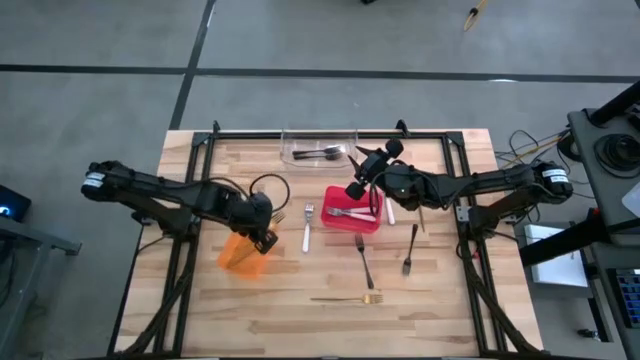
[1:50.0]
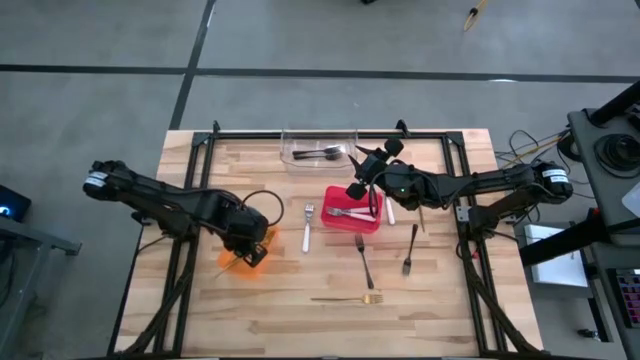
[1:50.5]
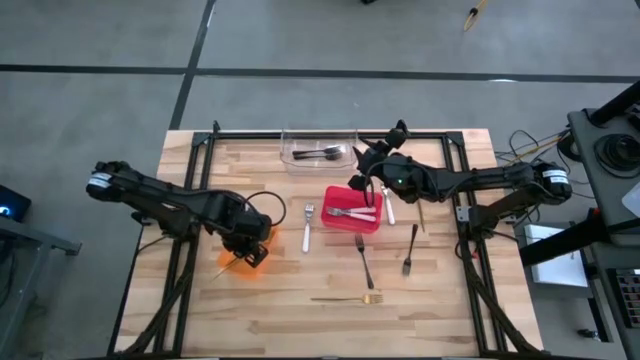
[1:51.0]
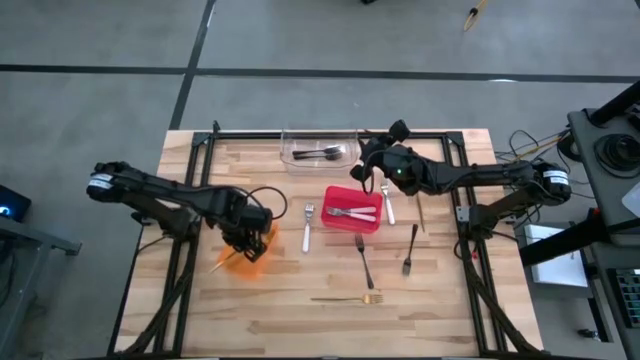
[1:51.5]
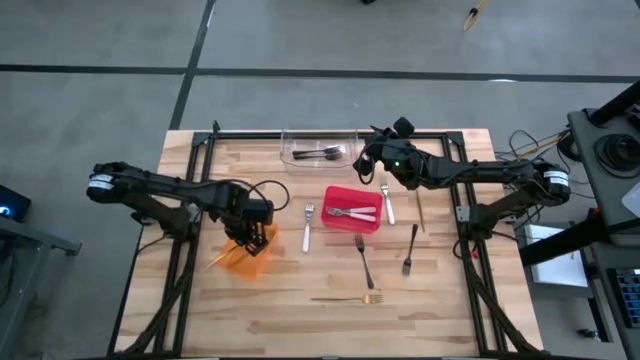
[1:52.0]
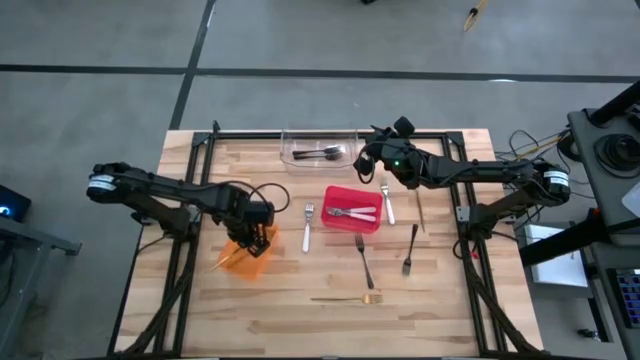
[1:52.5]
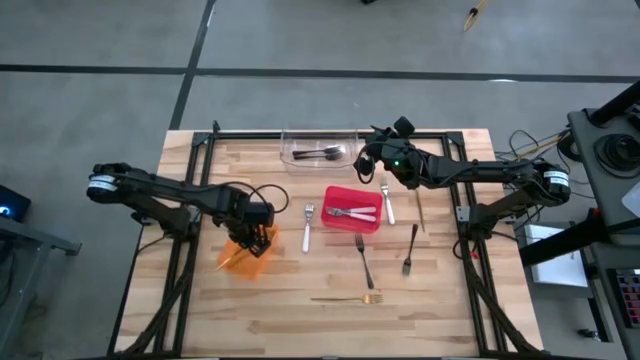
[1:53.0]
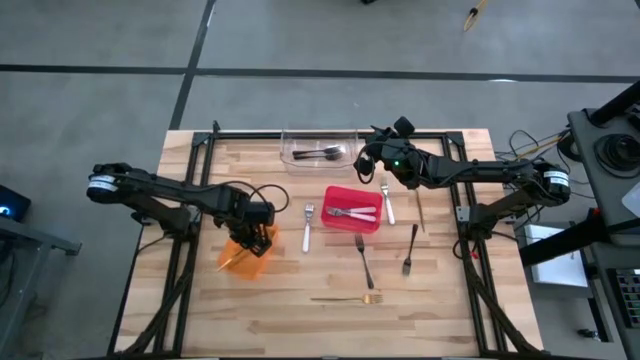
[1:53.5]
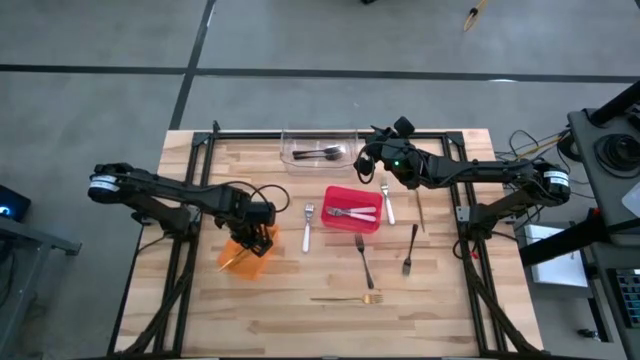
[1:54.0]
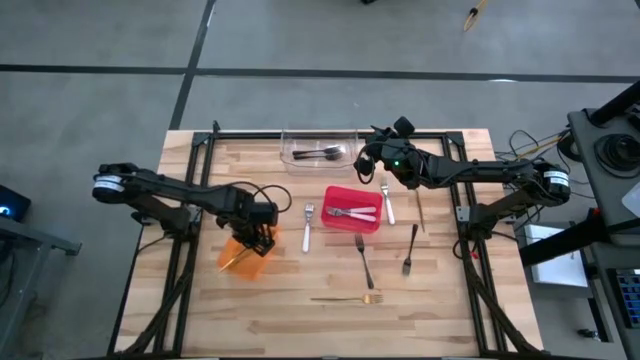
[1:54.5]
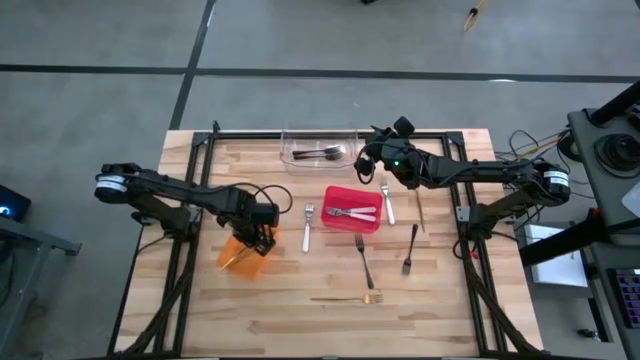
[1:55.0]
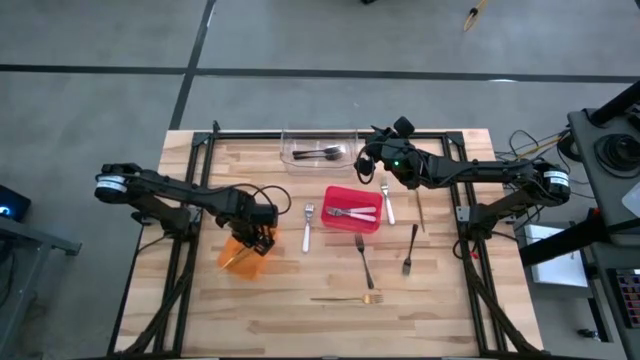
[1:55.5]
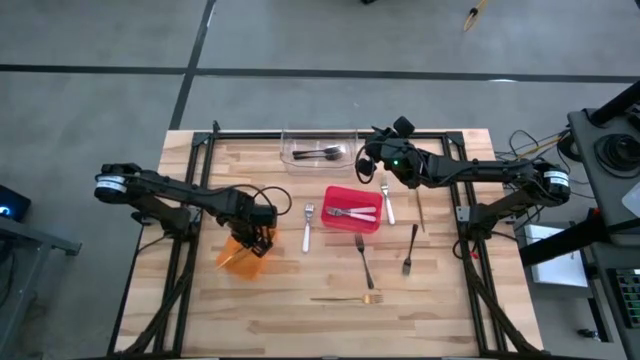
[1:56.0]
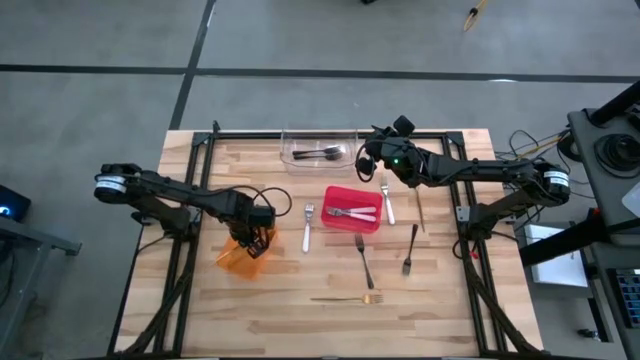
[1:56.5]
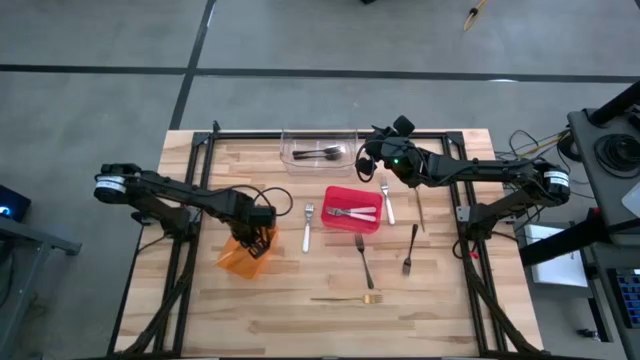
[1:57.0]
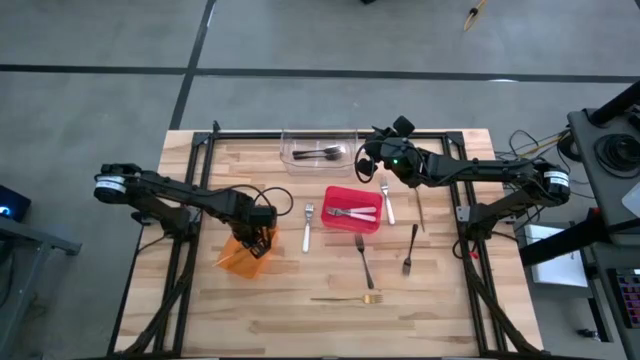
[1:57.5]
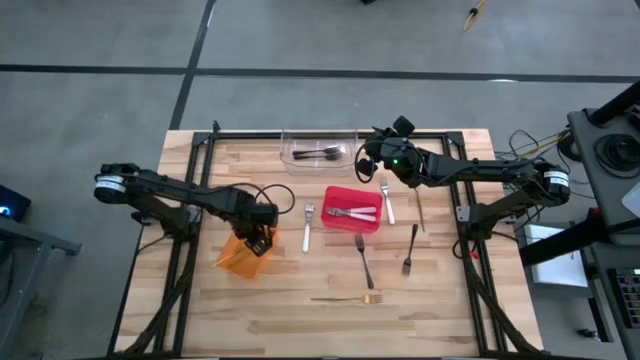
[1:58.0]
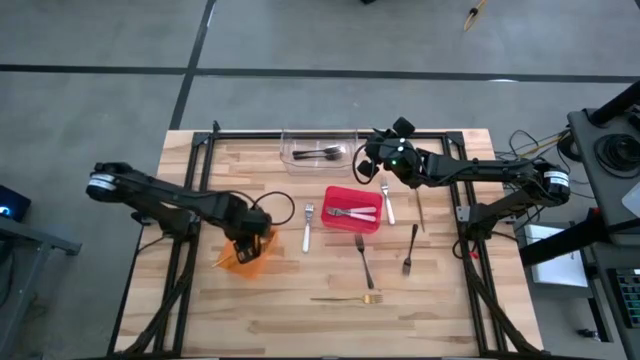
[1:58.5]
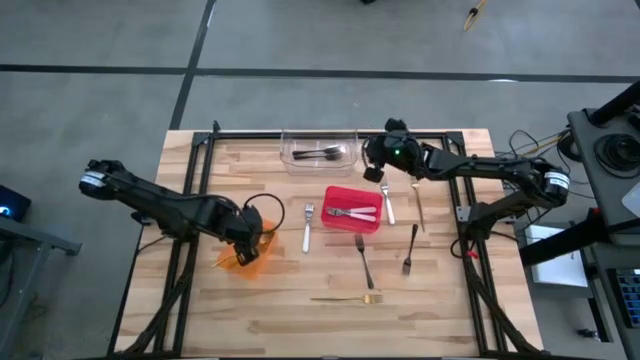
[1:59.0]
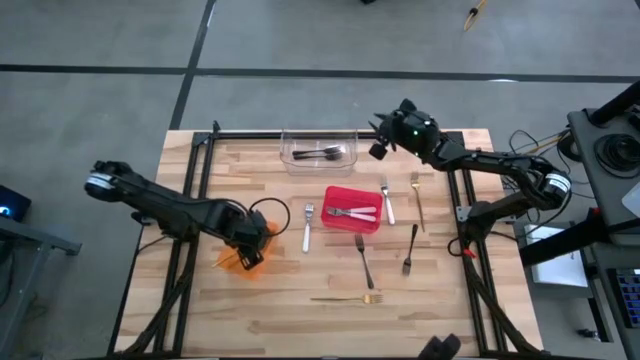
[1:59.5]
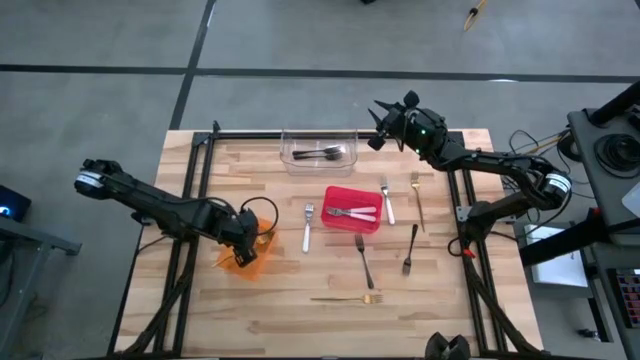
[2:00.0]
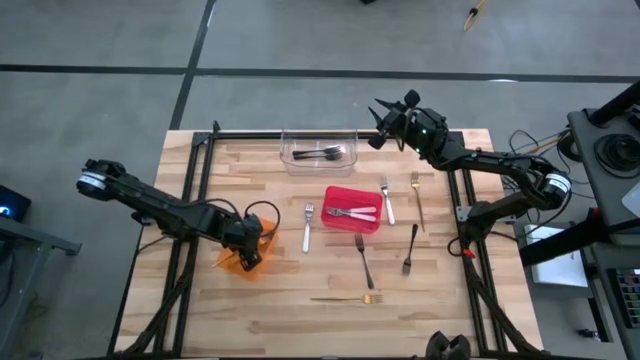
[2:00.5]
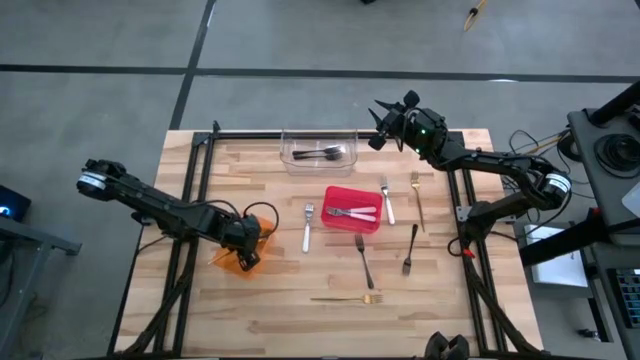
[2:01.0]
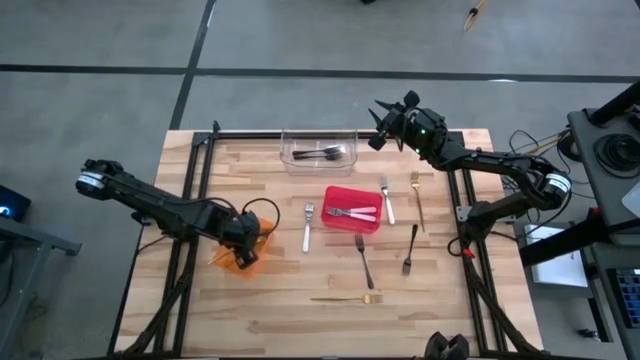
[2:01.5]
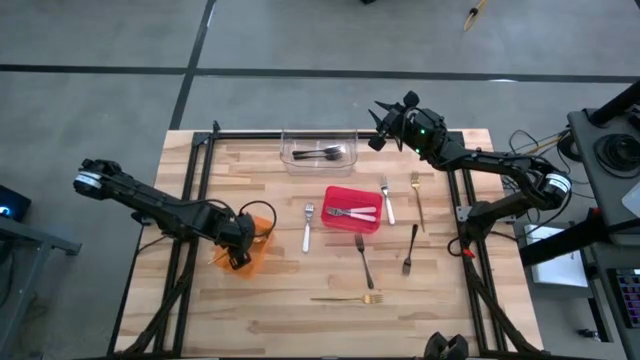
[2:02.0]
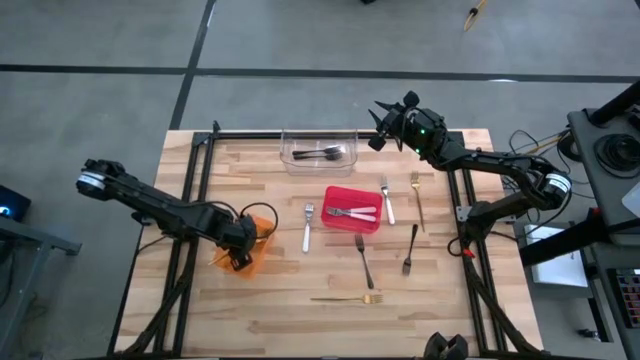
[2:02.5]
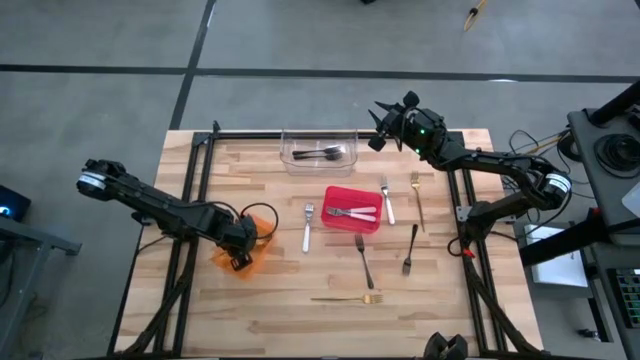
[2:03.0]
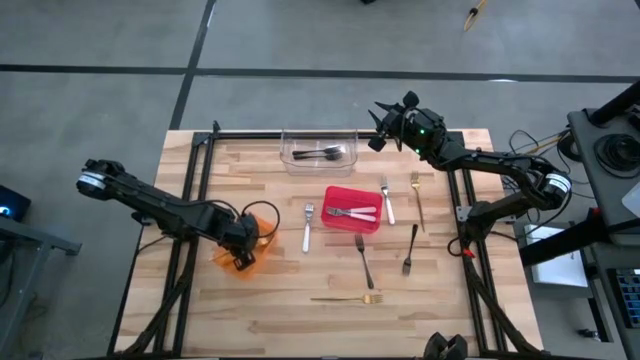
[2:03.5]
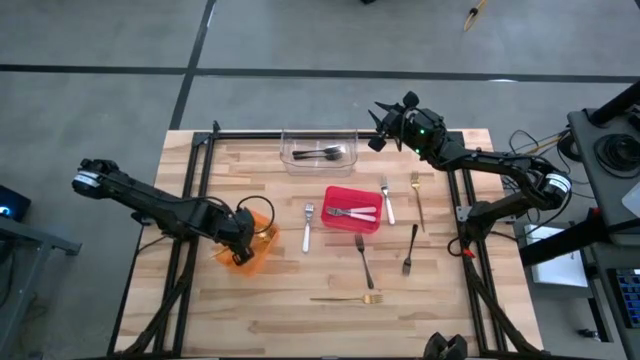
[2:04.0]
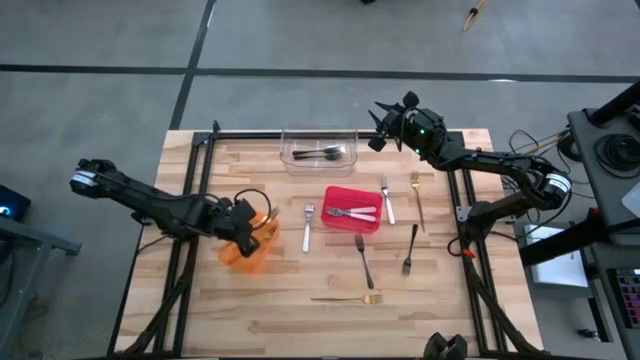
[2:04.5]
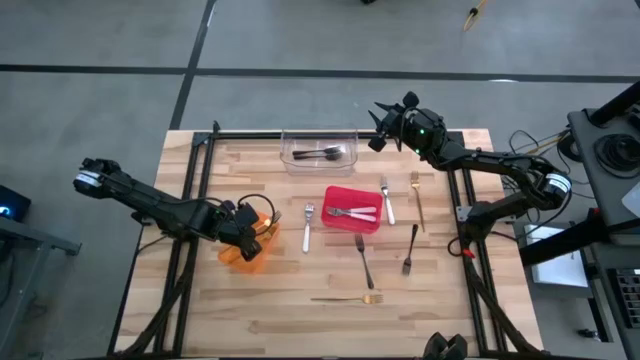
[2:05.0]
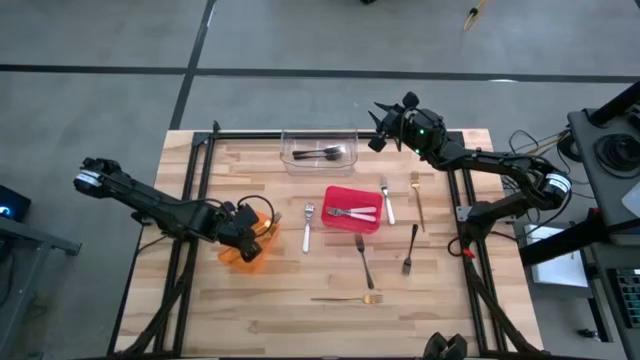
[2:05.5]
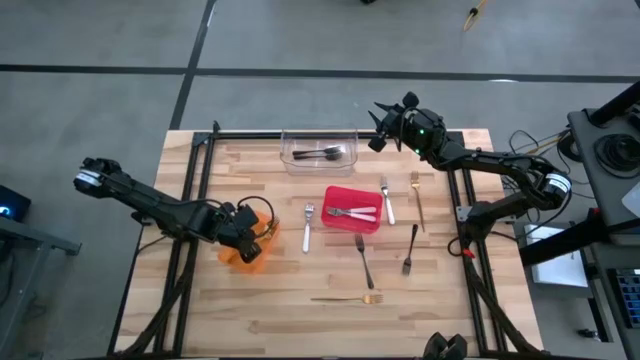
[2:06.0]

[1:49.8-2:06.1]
Task: Sort silverware by color (type)
Put the gold fork into the orange bin

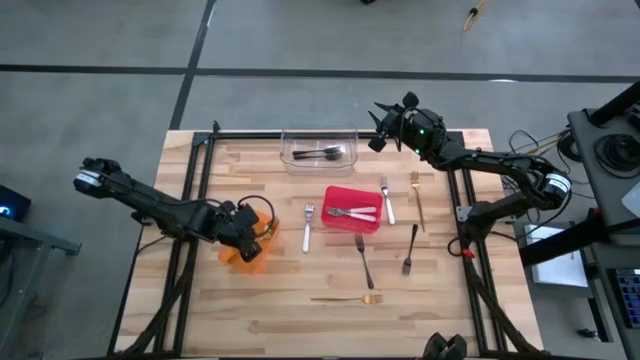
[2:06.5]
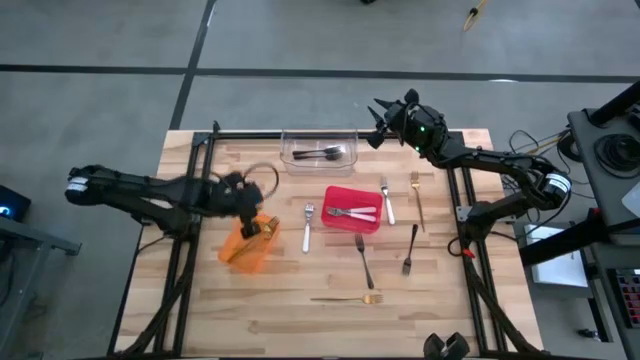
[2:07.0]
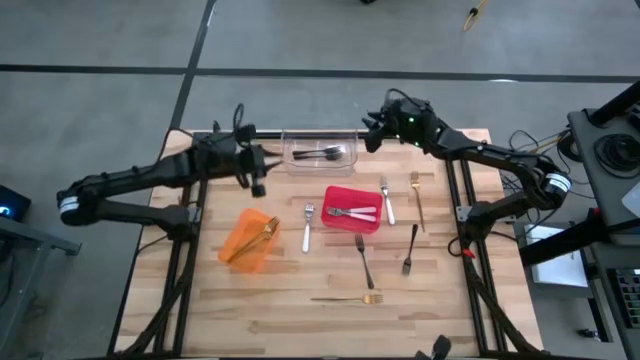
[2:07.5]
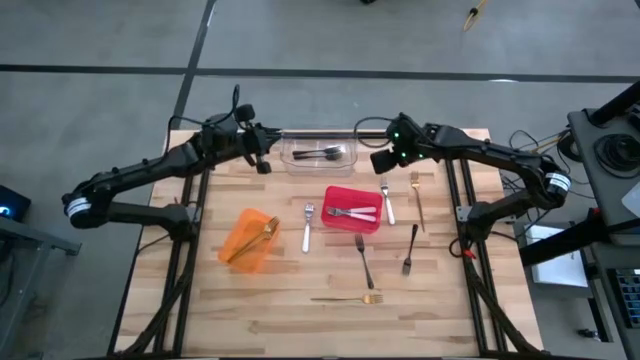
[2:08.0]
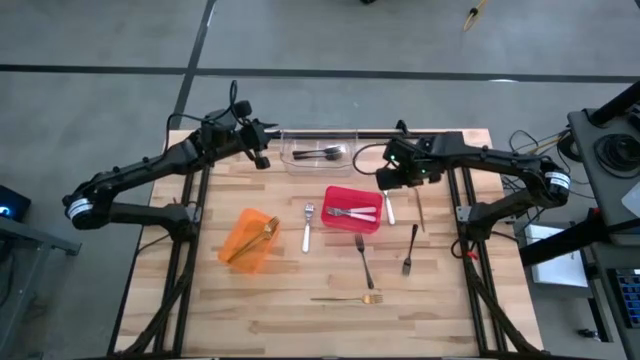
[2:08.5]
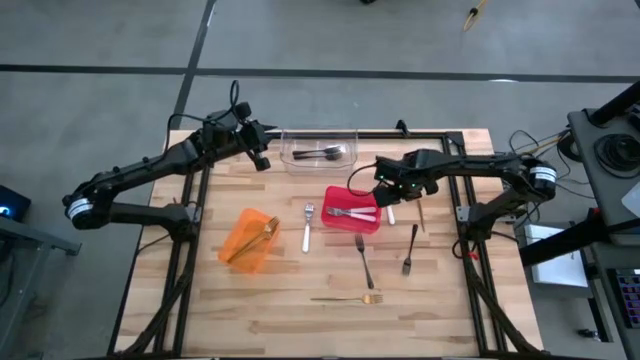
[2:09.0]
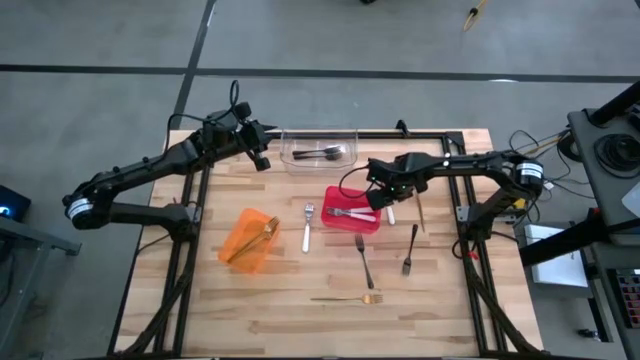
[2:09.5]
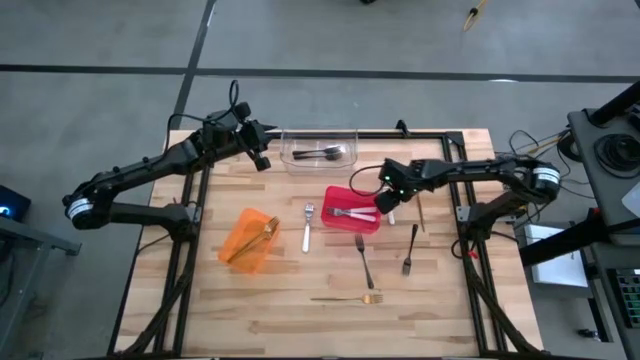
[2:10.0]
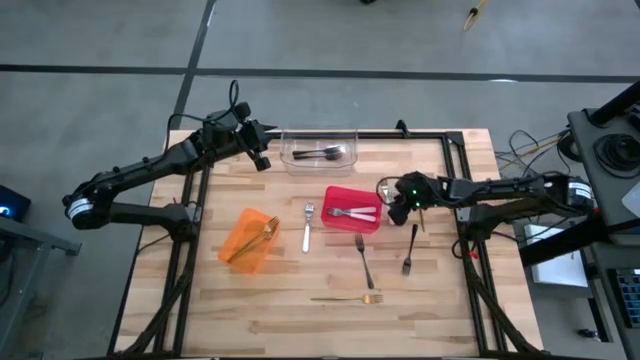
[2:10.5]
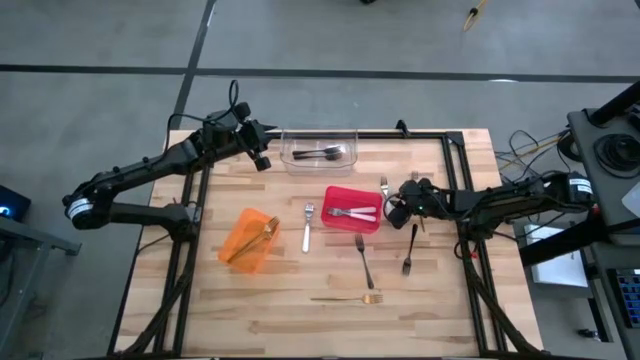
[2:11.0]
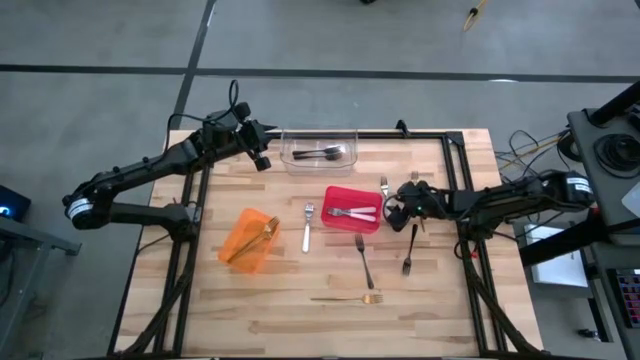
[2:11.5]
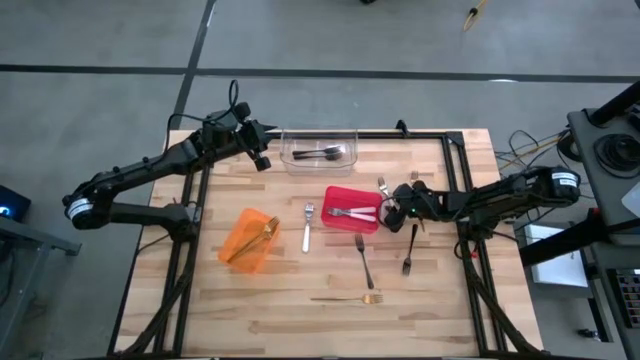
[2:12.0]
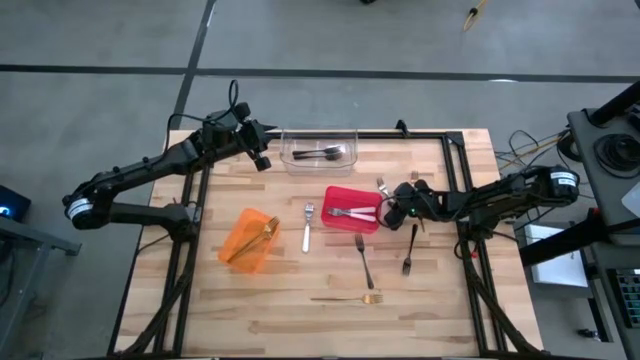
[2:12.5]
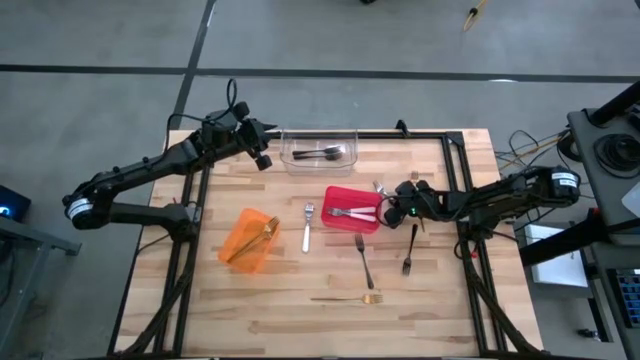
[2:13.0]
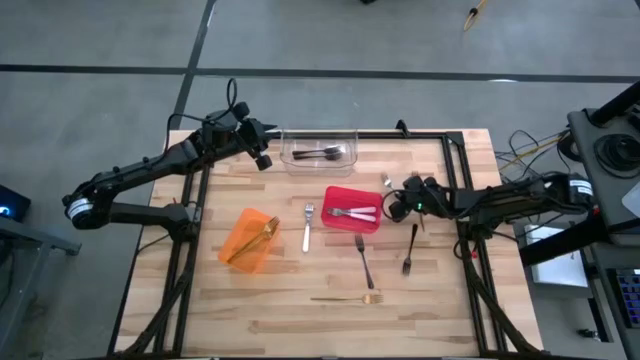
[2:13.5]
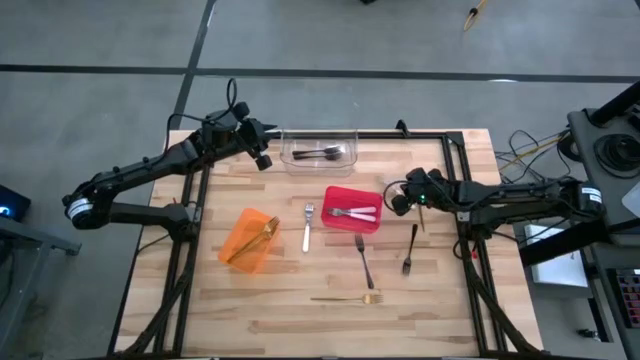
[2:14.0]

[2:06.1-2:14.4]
Put the white fork into the red bin
